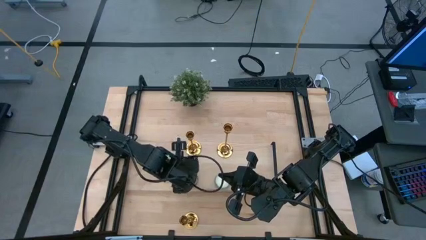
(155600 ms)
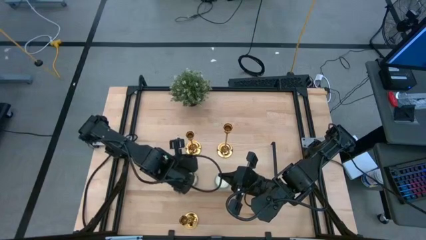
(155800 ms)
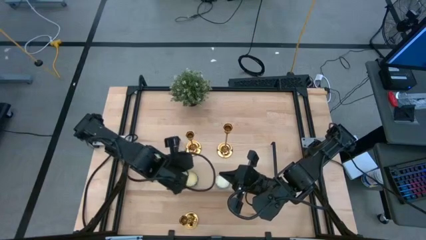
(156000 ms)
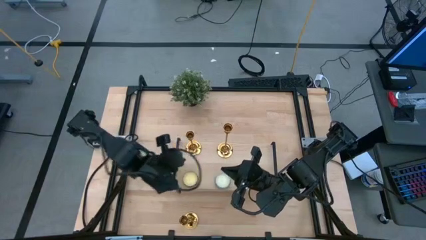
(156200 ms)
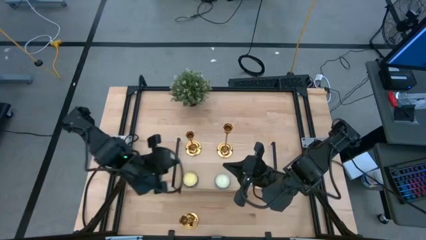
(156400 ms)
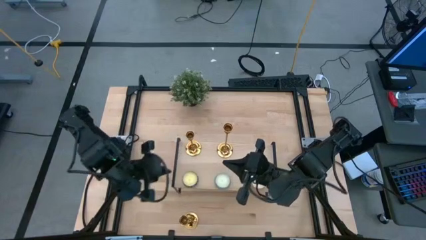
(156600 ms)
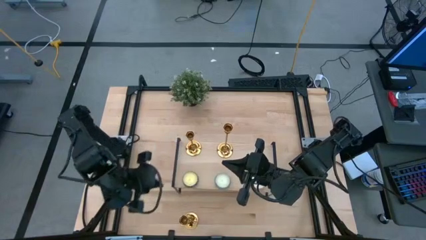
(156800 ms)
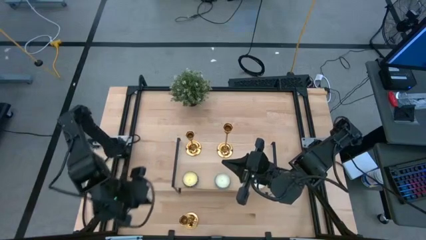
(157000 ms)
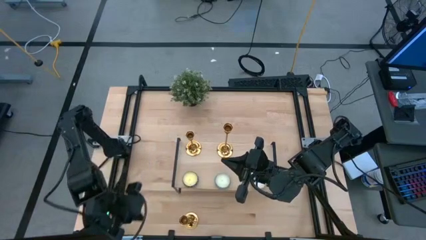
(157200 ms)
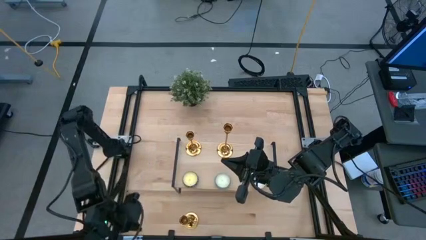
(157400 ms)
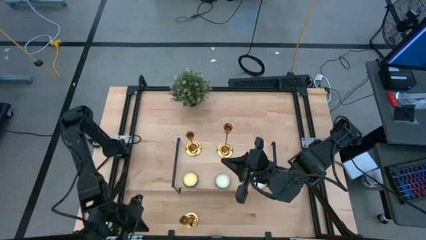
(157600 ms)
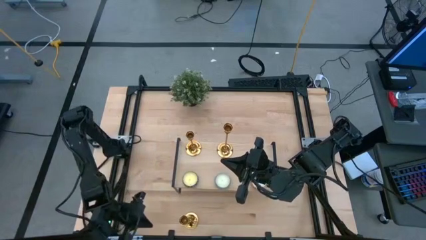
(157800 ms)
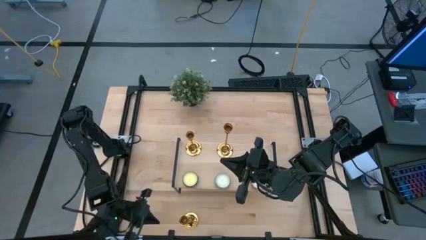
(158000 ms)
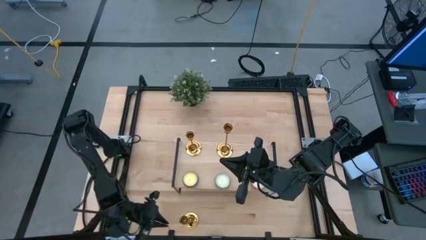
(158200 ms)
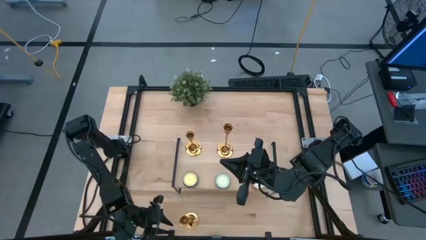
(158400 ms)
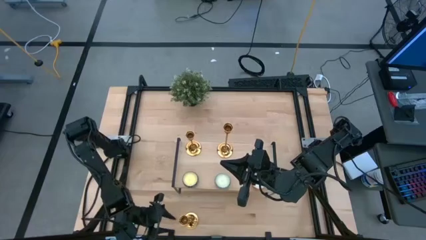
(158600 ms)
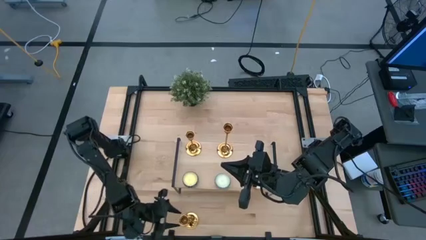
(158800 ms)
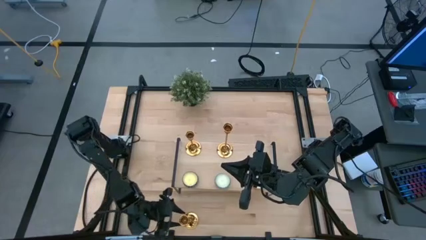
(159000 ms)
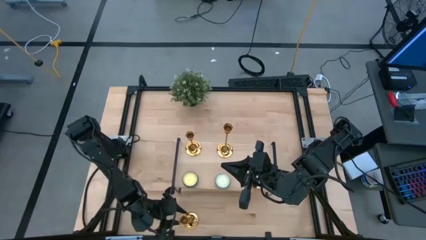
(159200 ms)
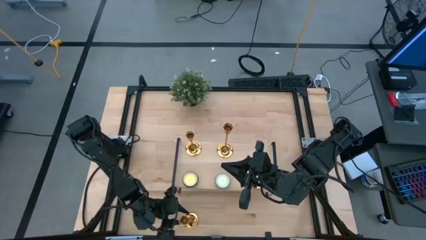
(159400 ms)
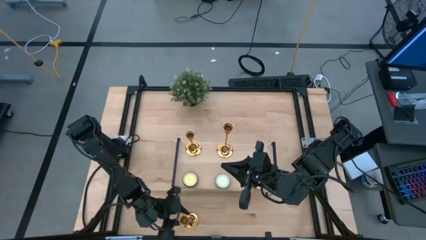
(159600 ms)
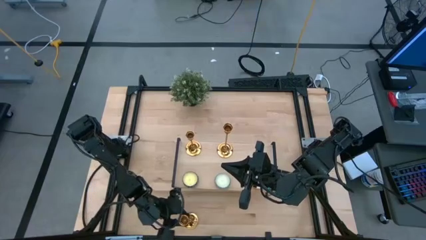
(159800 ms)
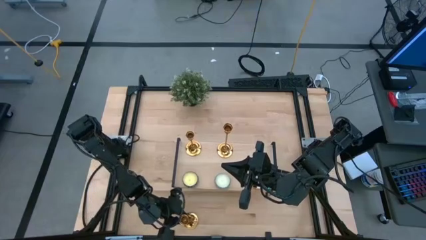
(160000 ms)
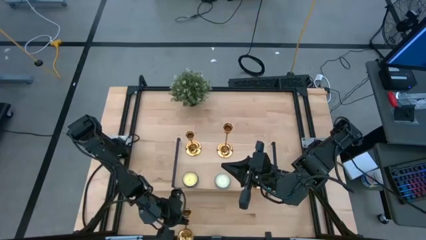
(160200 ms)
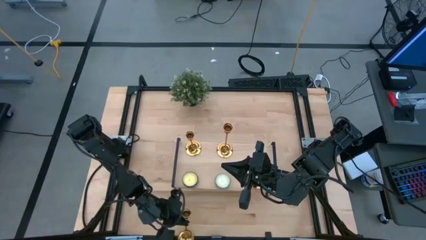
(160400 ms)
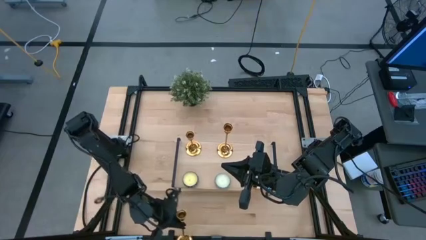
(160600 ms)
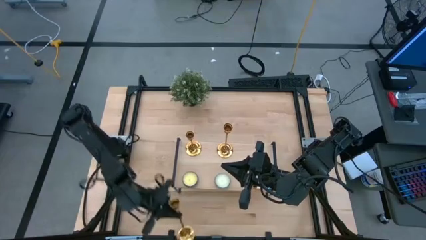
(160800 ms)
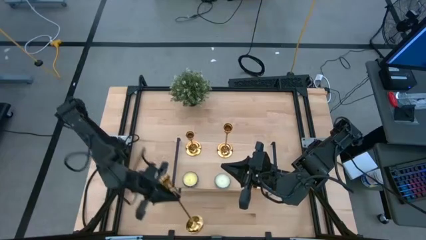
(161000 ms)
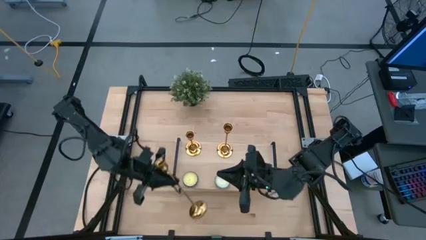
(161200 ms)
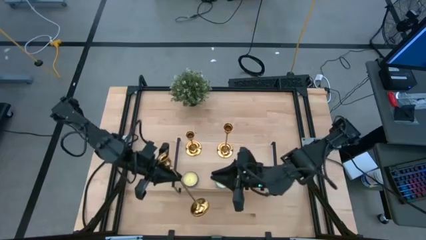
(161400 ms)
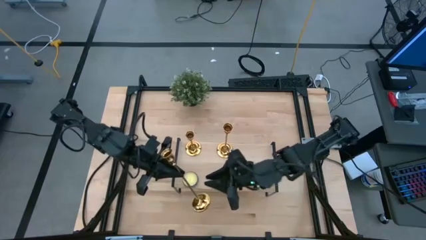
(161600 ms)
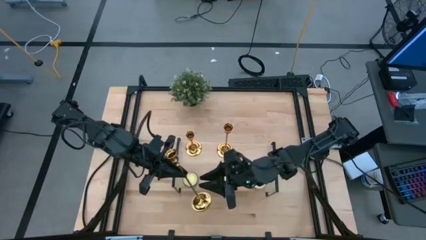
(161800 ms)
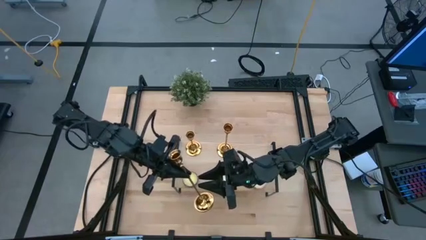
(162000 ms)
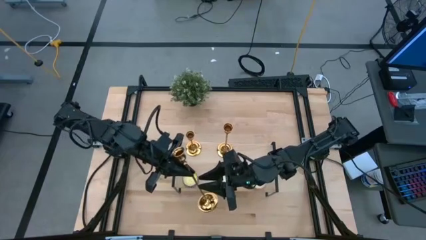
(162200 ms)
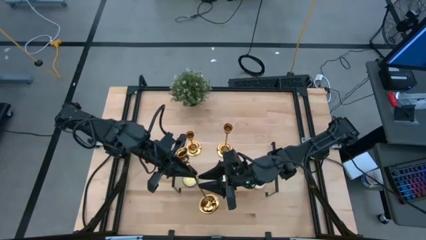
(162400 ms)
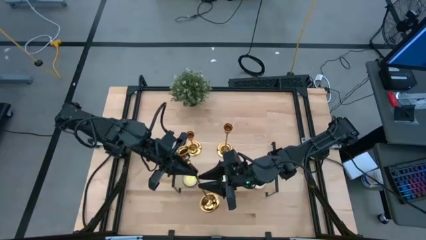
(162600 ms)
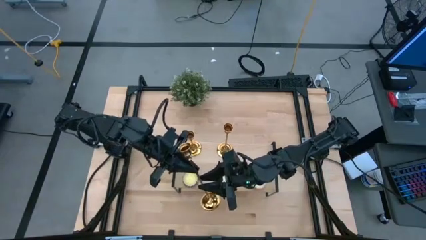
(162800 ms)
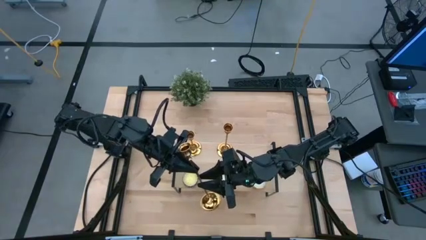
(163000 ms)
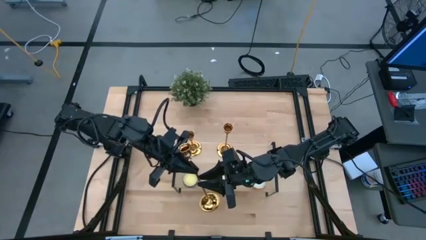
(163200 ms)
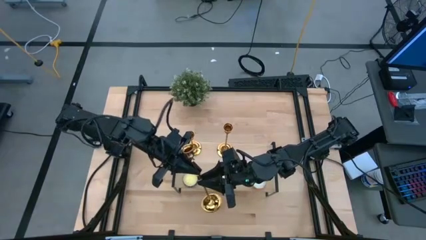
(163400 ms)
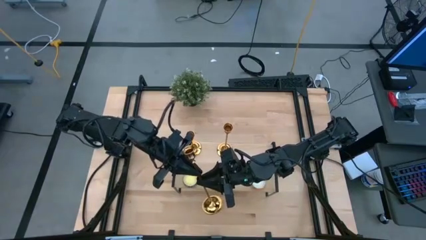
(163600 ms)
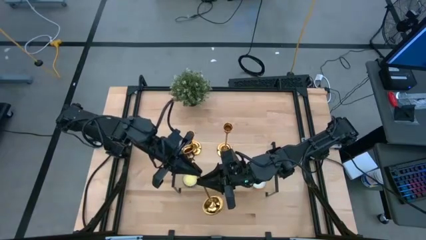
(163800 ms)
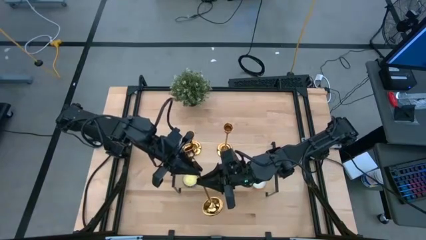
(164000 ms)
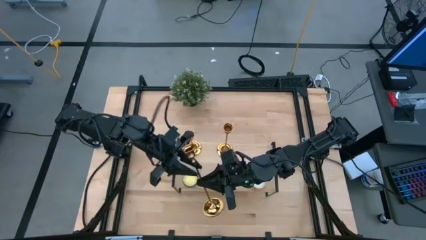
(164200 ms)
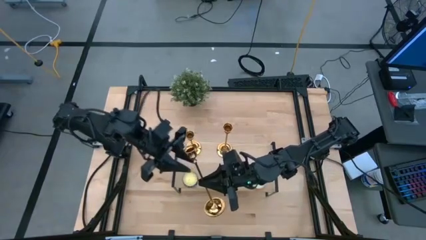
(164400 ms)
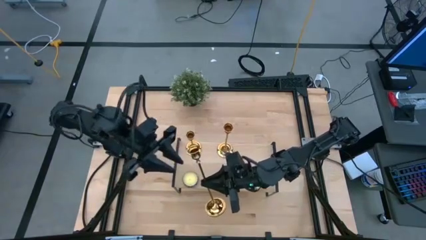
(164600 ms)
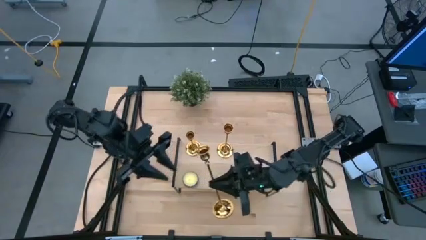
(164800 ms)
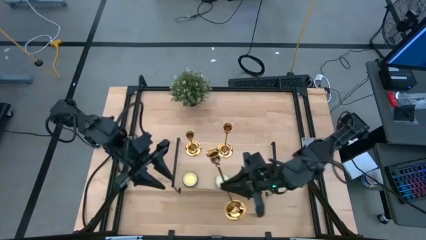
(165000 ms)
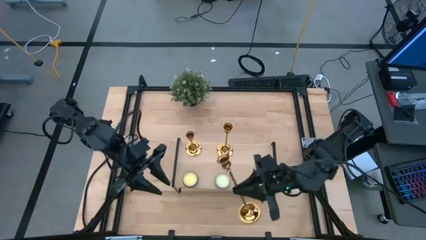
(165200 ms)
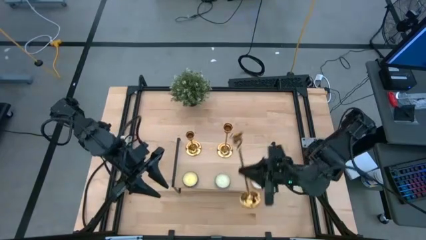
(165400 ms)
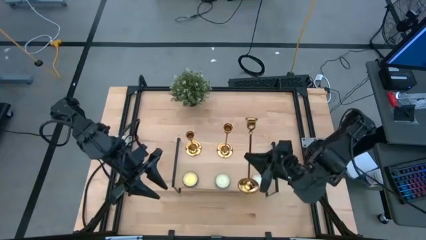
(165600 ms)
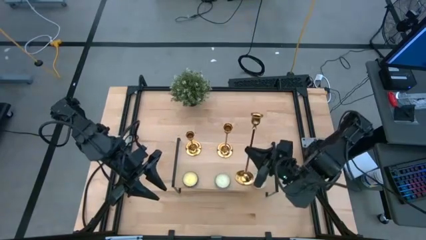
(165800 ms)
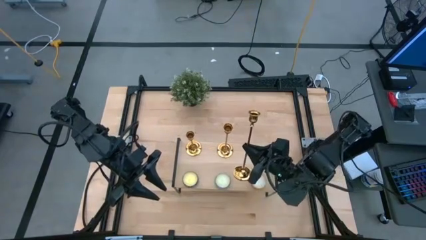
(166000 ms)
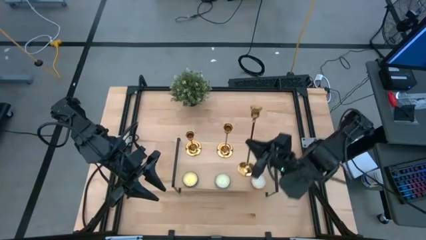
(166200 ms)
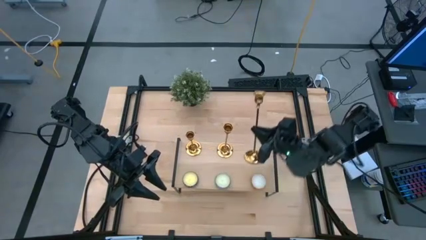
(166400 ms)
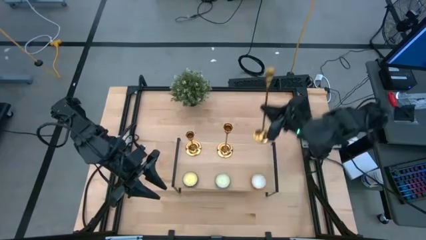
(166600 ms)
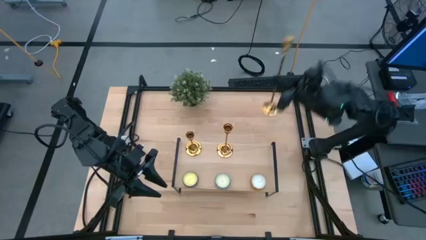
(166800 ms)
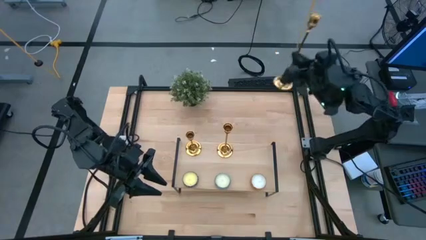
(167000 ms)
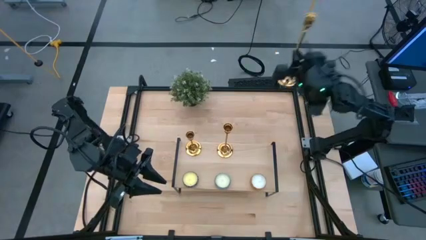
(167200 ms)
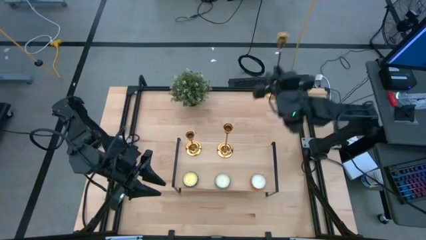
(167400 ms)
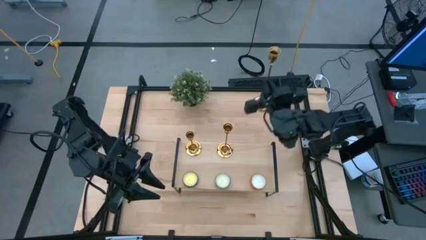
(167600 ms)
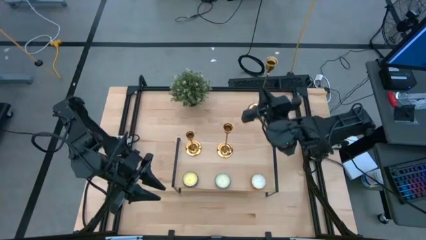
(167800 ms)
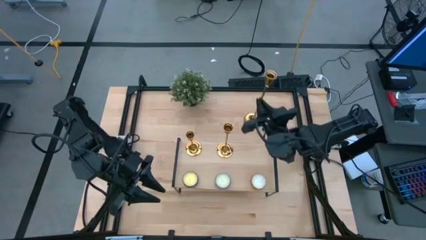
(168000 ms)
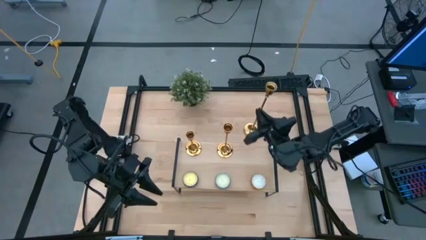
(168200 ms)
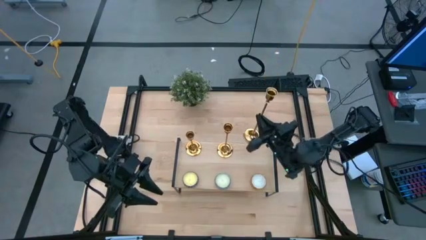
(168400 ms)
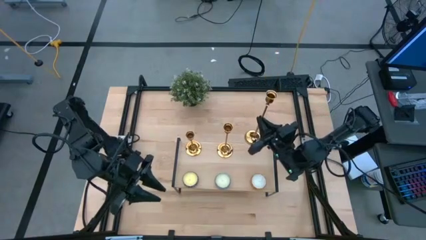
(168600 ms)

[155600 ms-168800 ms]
Task: Pick & Place candle stick holders
Put the candle holder on the shelf aligned with the other candle holder

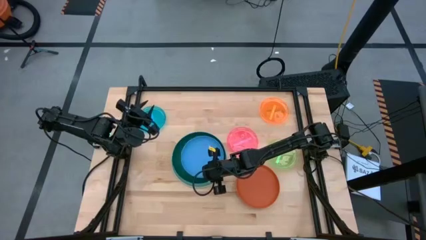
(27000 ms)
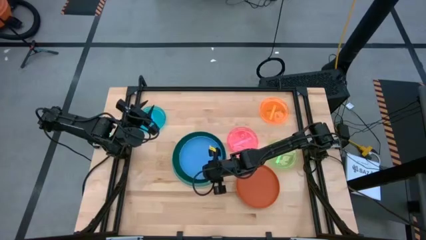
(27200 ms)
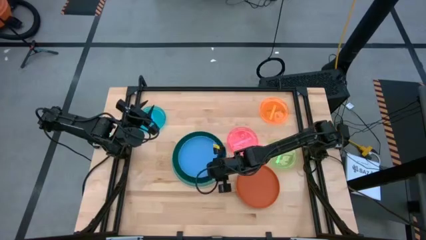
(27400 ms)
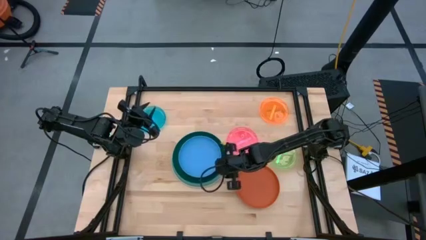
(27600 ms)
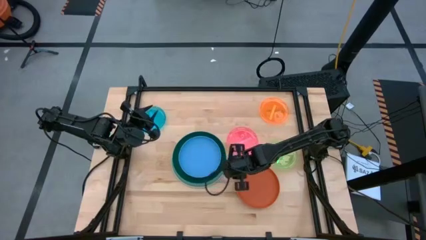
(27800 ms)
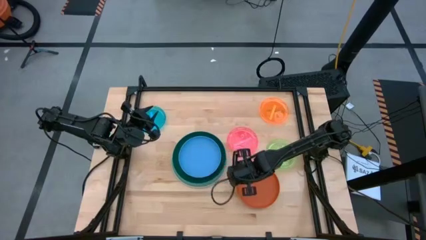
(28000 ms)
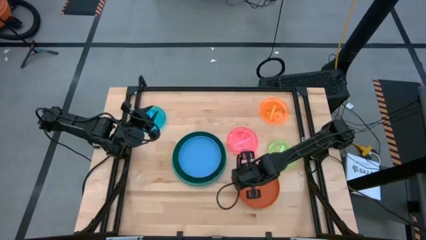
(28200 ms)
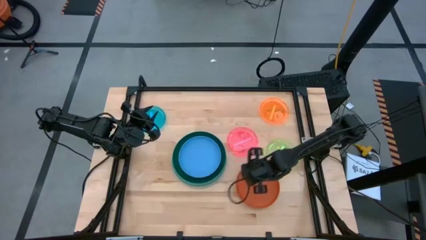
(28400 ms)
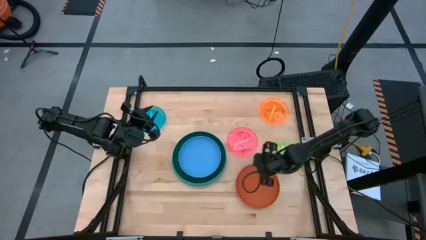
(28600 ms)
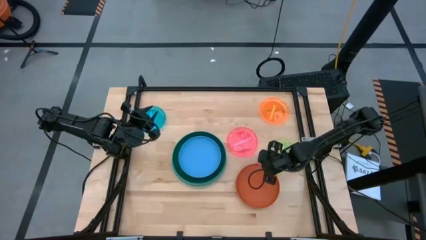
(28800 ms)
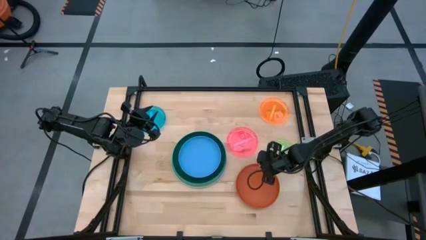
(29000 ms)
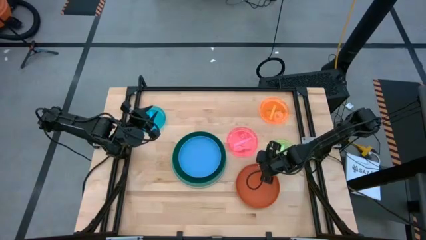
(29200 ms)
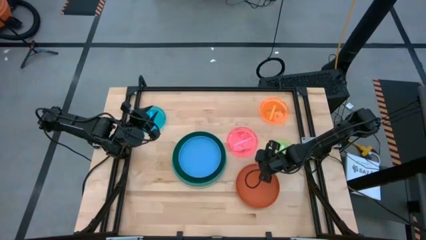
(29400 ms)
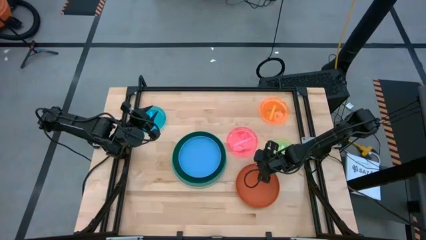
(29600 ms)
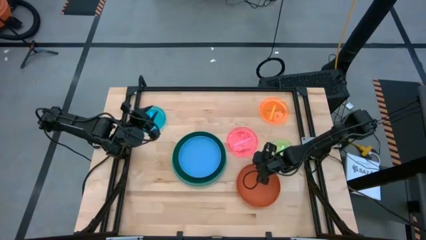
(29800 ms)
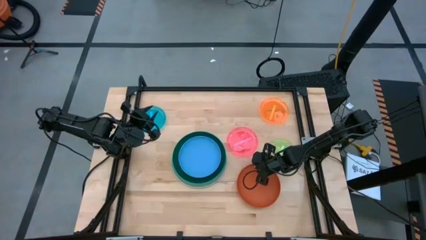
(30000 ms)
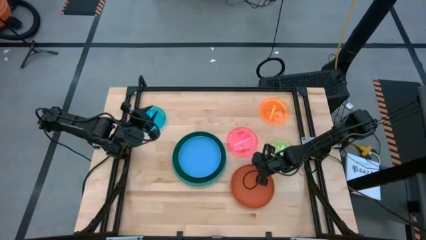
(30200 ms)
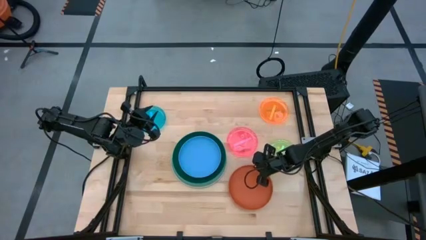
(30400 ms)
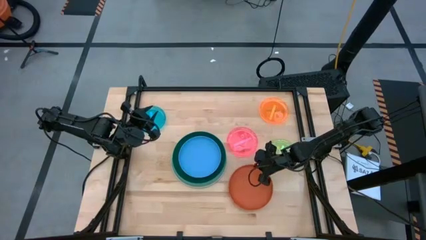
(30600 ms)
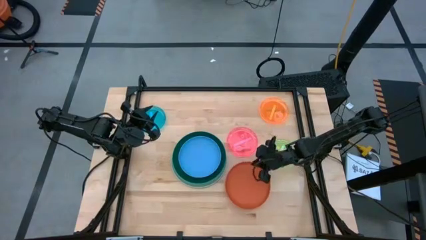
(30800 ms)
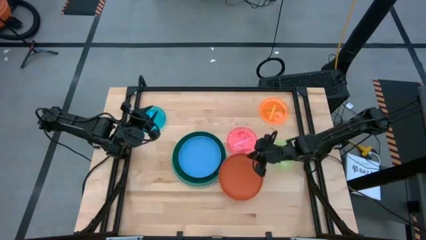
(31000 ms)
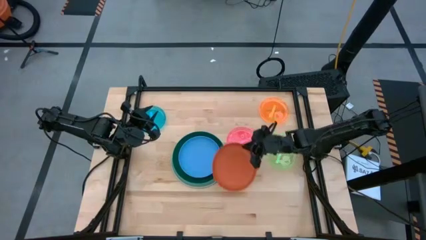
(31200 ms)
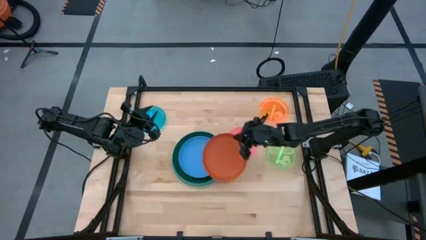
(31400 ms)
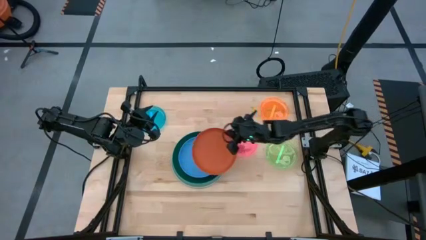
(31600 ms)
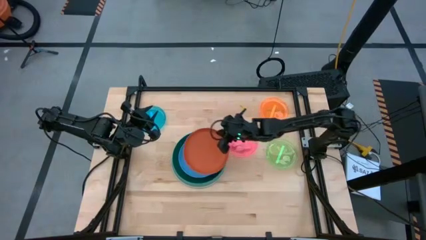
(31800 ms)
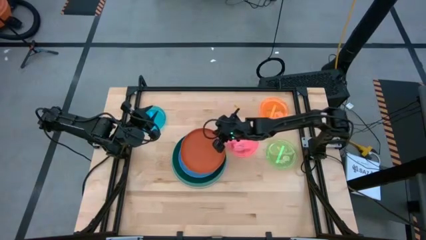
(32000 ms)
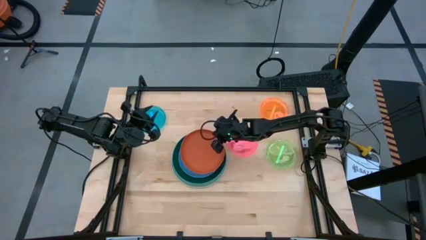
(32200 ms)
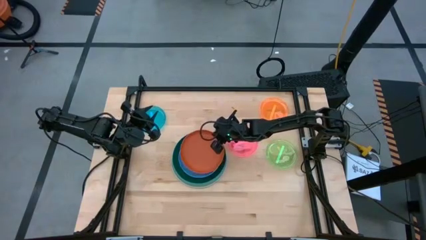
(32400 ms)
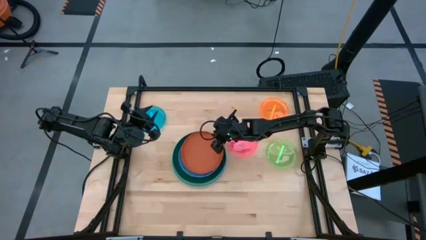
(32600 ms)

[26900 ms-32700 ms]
Task: Stack plastic plates
Stack the orange plate on top of the dark blue plate
